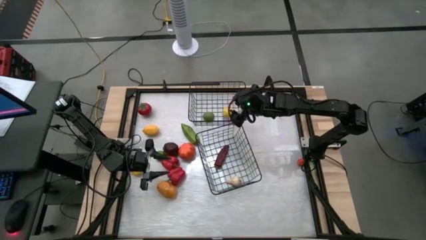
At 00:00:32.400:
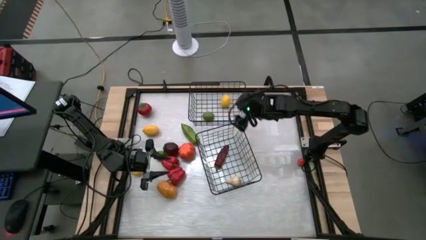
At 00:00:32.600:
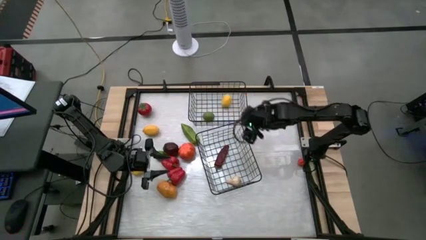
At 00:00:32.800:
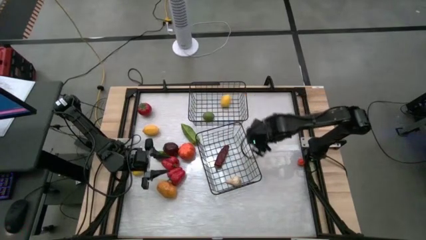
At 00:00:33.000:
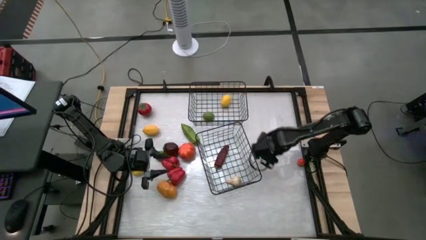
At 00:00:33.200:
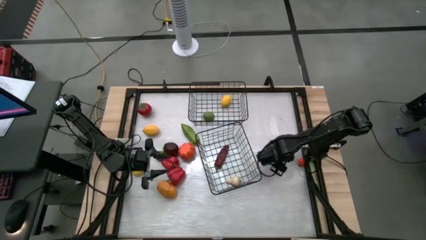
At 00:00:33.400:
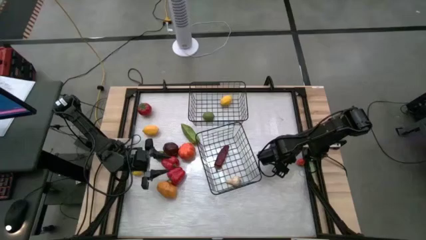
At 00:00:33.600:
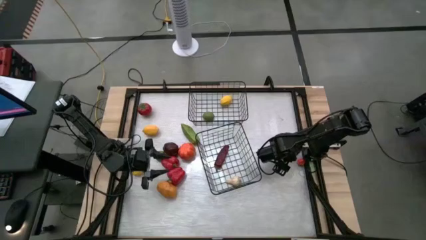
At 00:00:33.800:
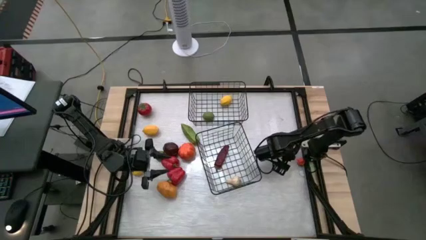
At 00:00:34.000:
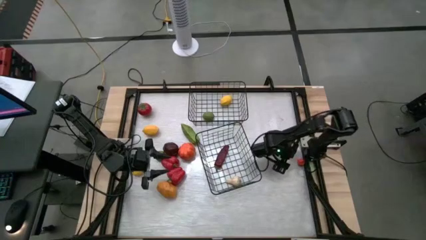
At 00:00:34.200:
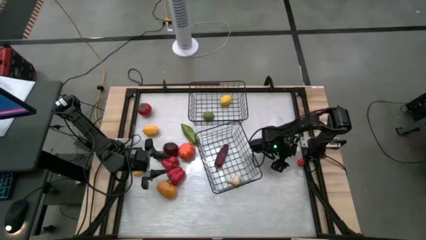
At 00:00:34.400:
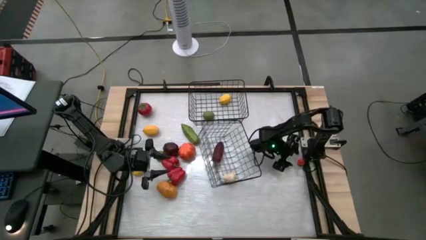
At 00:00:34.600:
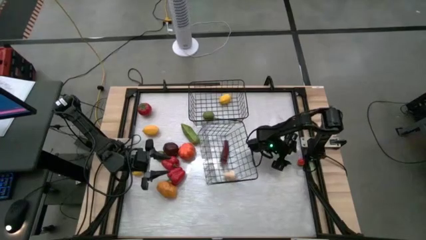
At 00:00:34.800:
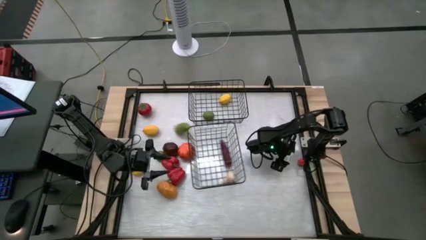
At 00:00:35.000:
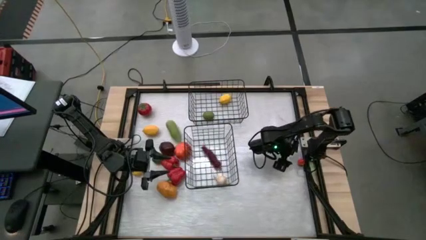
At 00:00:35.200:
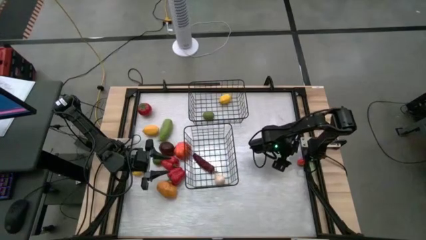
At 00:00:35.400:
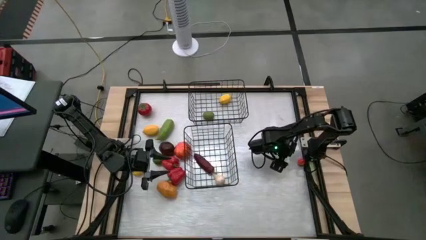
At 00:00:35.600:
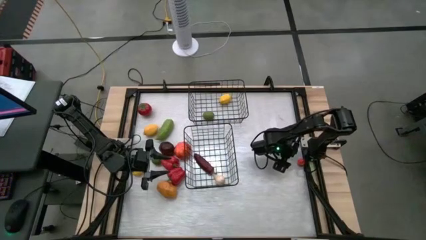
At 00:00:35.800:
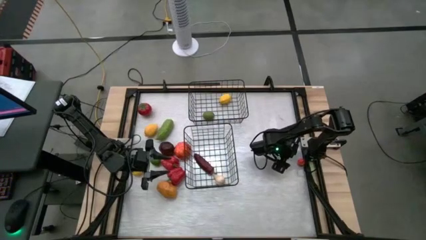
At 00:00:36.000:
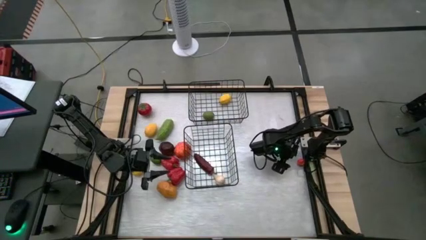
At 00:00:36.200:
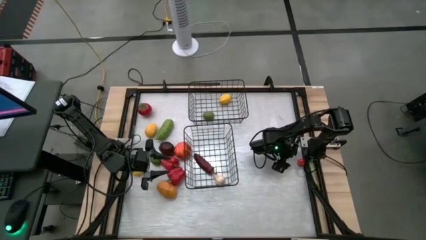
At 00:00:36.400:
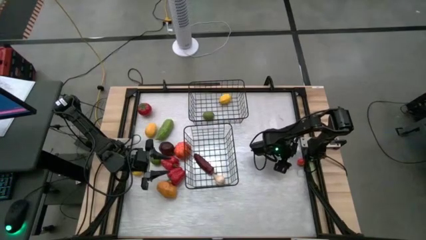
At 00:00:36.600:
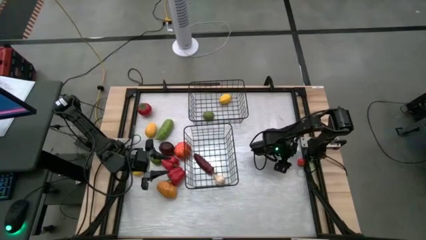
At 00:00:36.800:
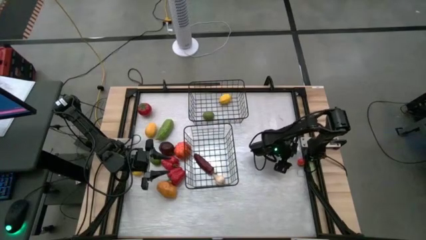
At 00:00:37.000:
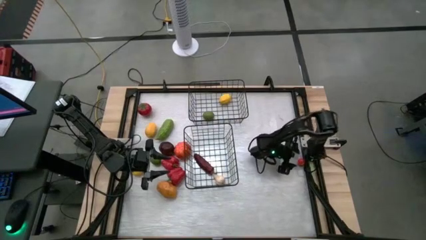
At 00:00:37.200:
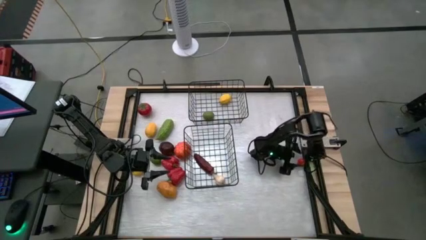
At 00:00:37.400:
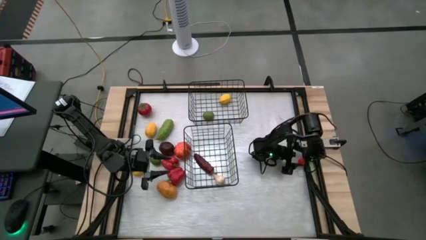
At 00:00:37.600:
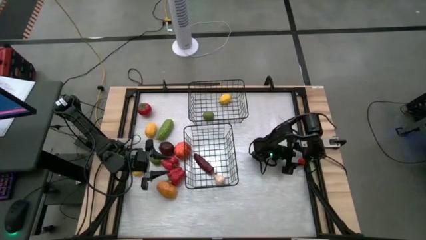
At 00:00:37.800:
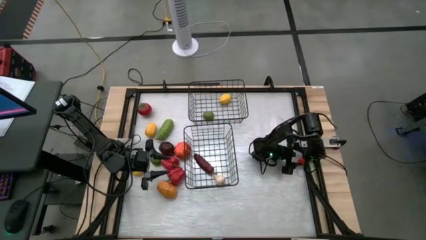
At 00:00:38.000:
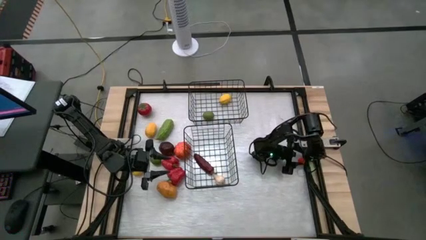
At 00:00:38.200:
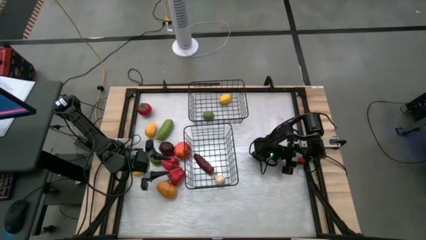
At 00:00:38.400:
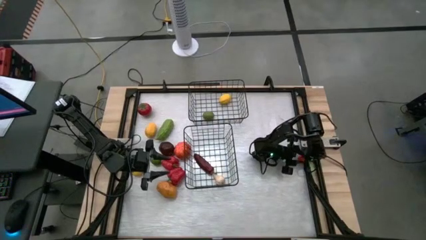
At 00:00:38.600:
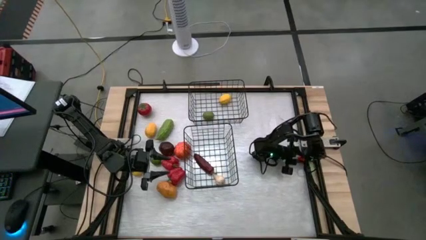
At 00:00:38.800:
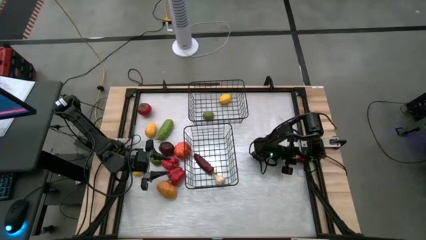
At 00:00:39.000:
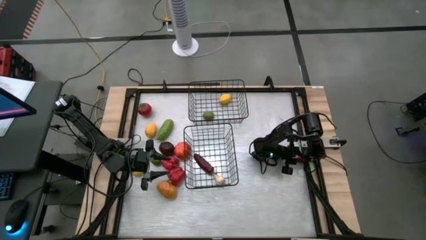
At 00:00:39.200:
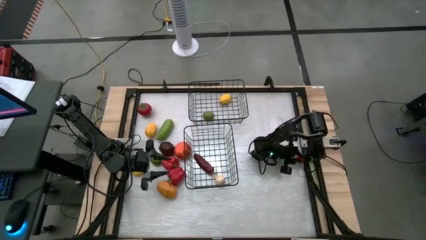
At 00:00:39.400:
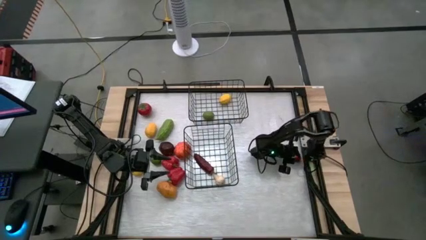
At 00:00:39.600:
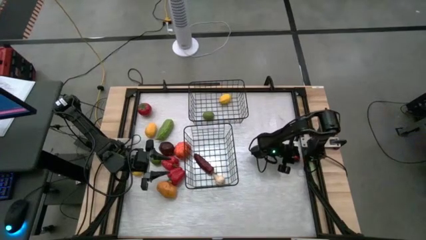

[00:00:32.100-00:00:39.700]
Task: Sort produce into baskets
Put the small red tomato into the top wire basket

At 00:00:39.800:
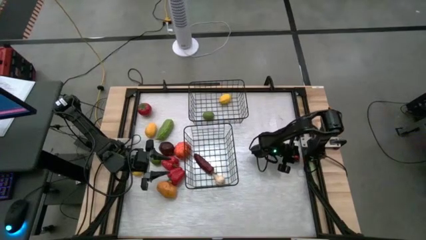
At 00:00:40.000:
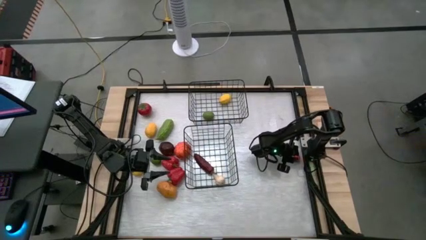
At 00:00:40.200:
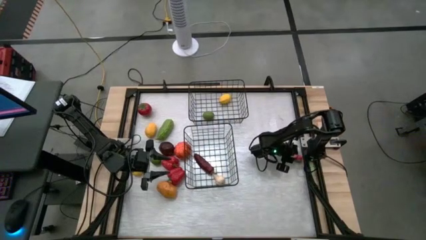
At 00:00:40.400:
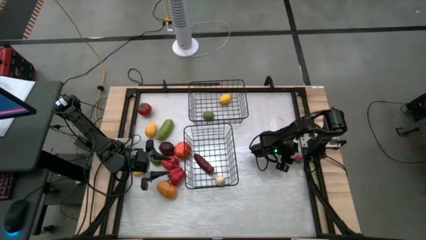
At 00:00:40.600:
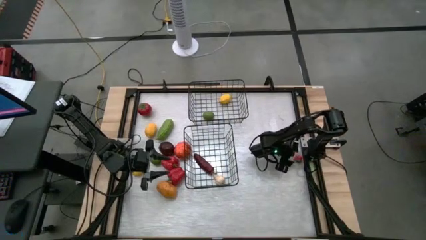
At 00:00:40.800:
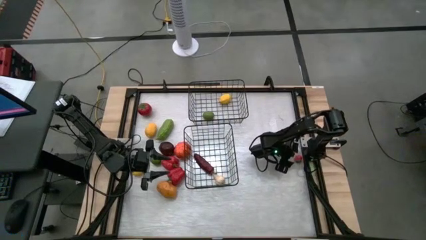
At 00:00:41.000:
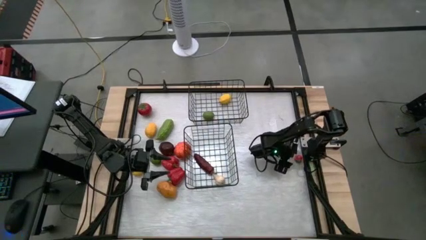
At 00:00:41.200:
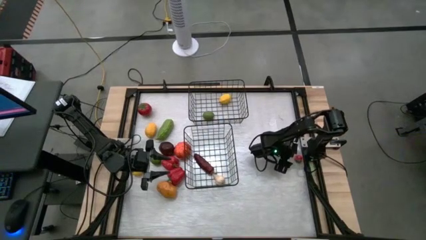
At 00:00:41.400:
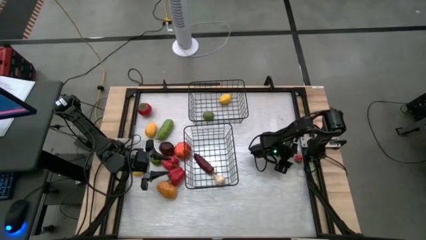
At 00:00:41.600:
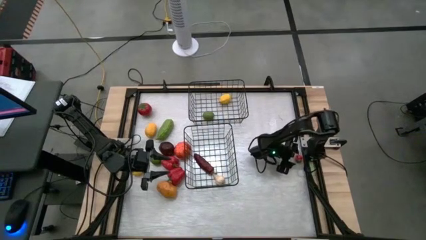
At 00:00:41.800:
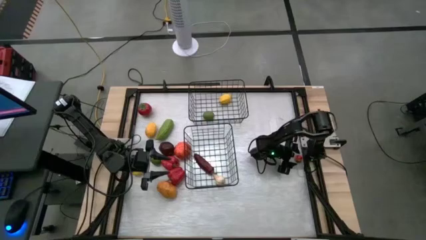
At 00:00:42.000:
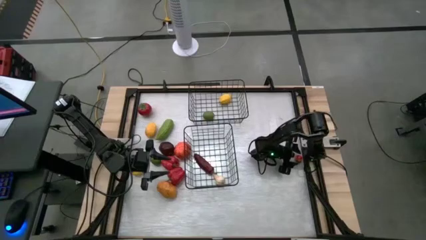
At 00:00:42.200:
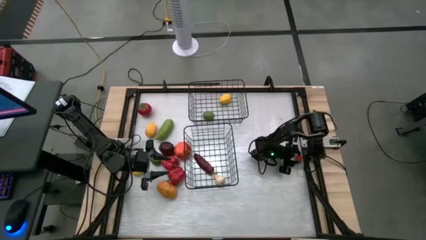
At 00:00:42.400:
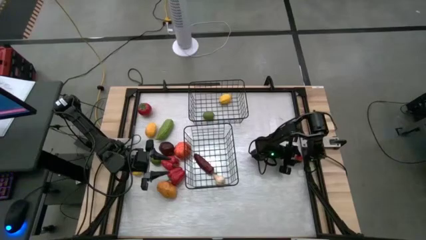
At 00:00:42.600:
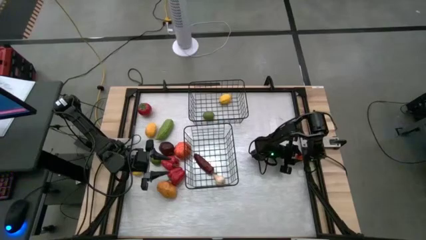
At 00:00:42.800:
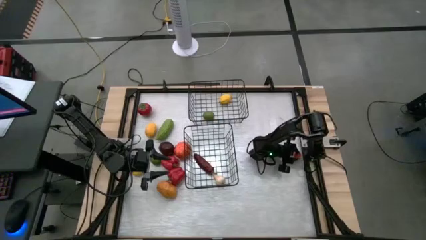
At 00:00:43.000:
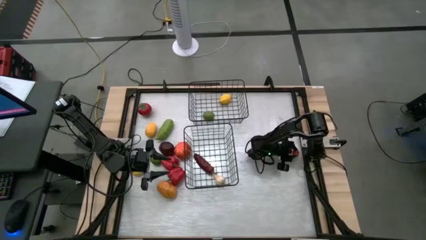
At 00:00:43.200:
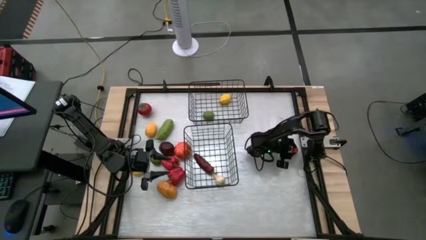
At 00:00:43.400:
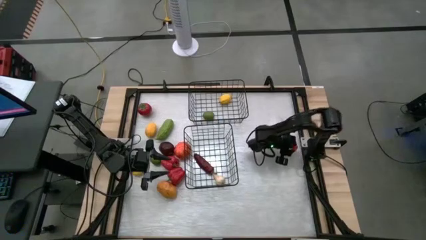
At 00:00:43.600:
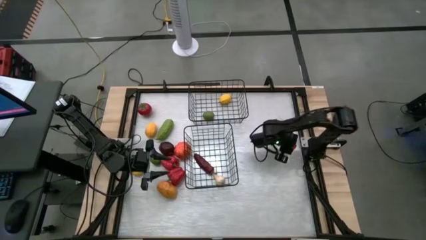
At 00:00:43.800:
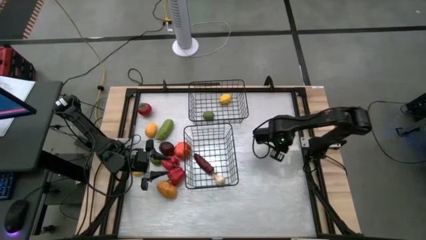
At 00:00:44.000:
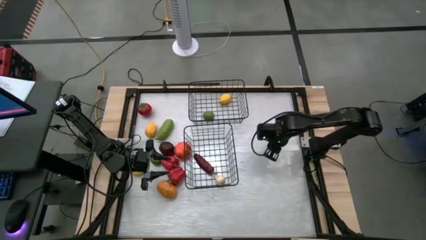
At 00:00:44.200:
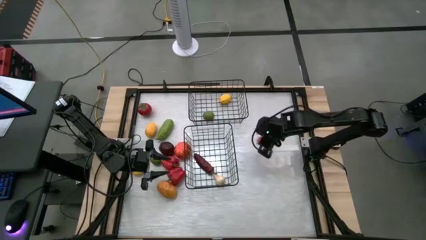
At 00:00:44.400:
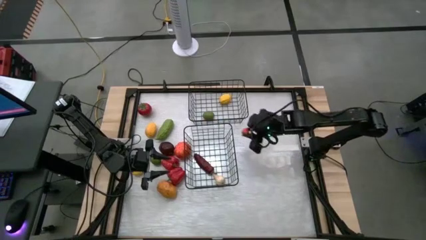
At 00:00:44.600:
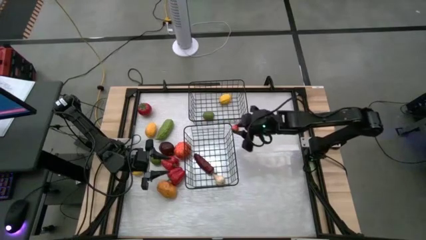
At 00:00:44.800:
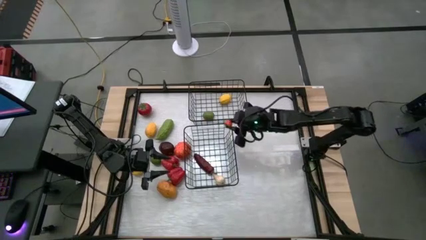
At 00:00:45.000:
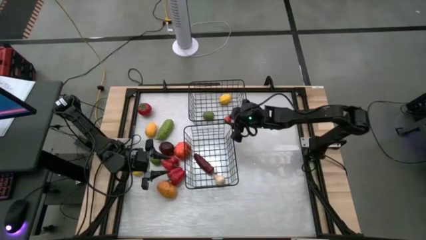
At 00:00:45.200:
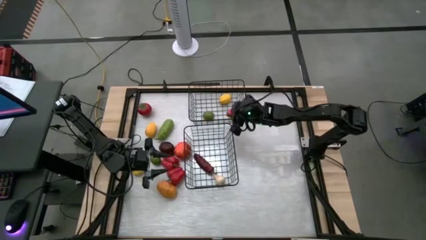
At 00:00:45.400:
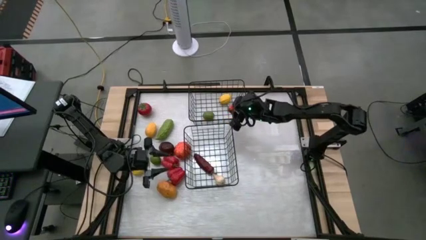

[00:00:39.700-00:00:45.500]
Put the small red tomato into the top wire basket

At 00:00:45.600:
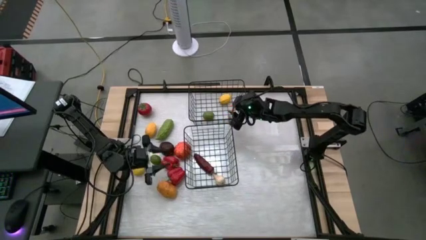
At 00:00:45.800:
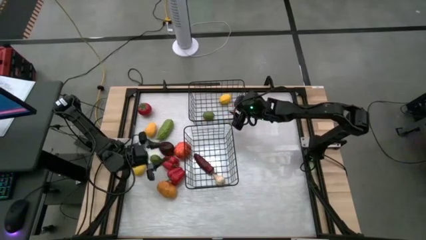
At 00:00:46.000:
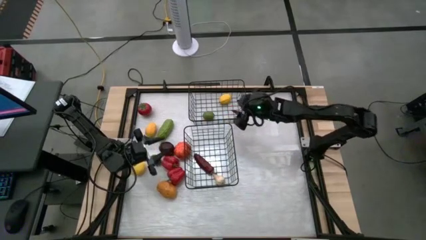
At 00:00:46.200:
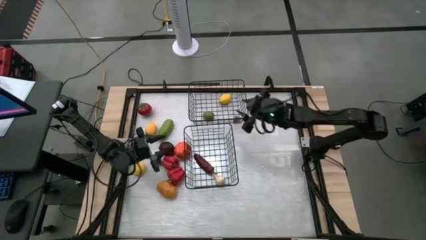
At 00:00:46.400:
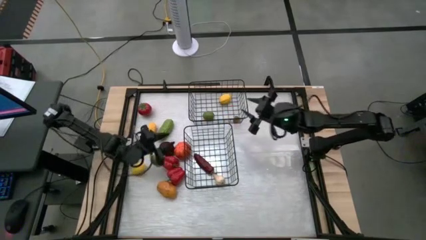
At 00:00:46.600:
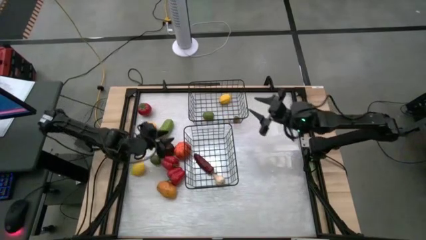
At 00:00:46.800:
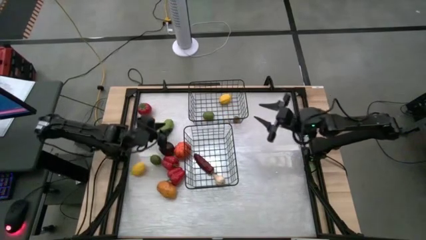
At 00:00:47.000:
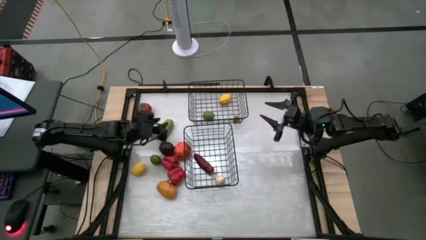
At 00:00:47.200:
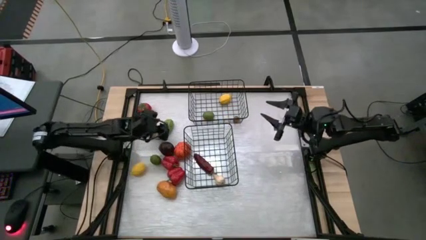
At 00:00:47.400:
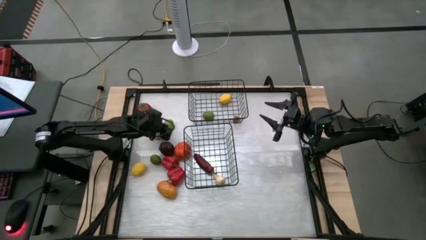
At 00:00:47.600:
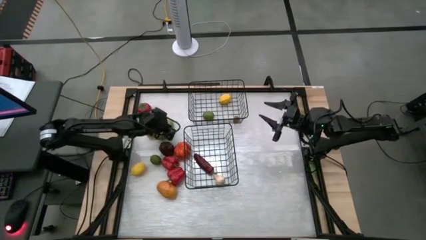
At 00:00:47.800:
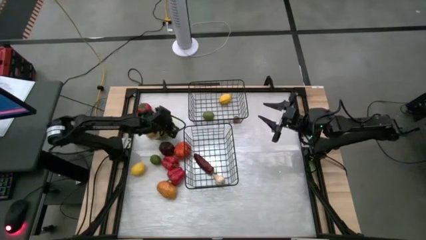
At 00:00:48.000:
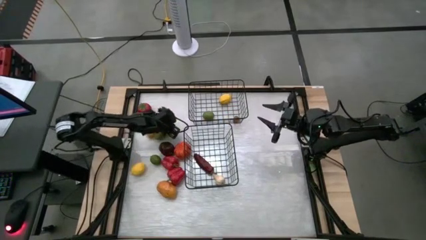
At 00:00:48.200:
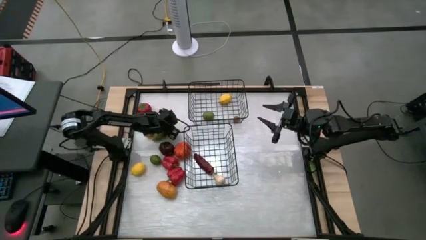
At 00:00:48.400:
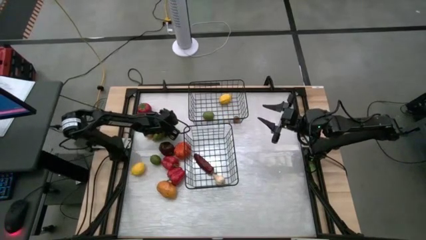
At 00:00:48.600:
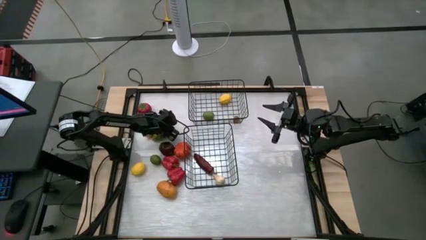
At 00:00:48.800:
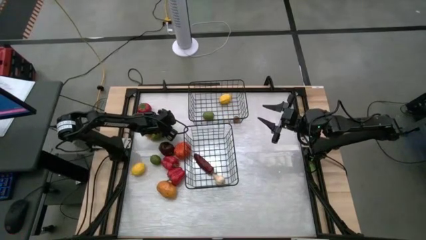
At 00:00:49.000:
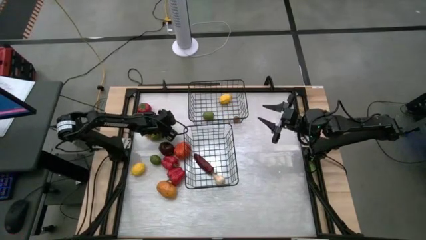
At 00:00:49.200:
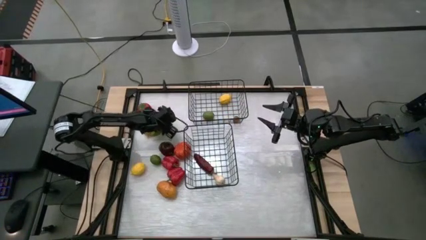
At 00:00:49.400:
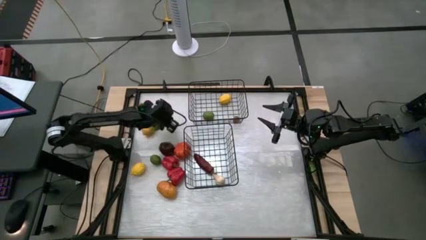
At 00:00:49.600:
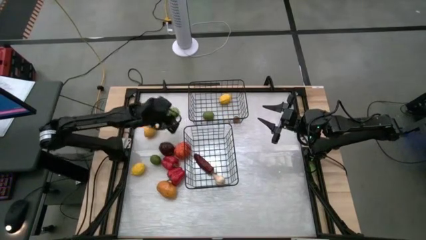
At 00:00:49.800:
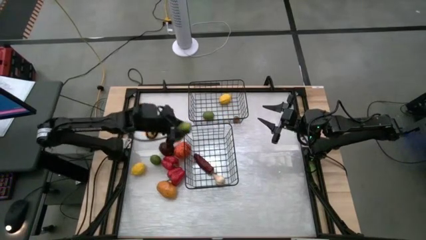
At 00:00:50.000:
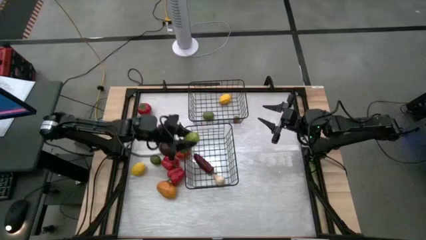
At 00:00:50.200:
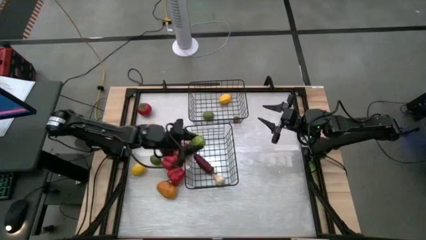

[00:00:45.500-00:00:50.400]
Put the cucumber into the bottom wire basket
